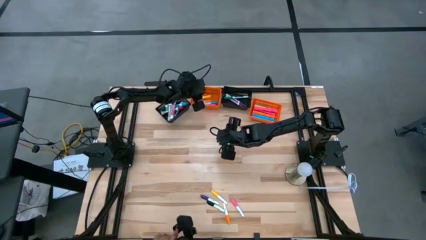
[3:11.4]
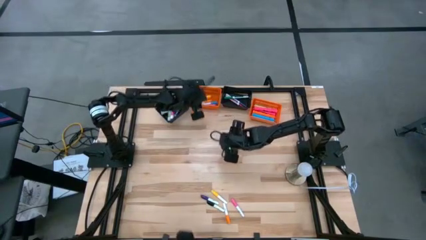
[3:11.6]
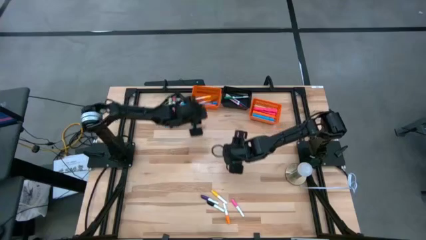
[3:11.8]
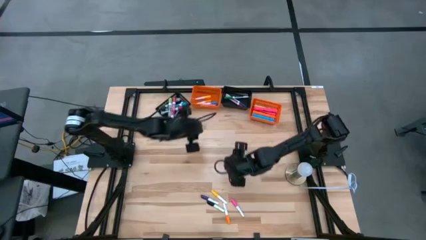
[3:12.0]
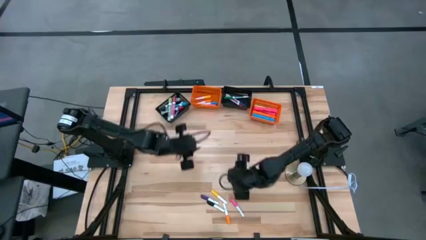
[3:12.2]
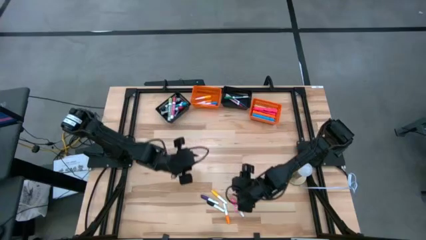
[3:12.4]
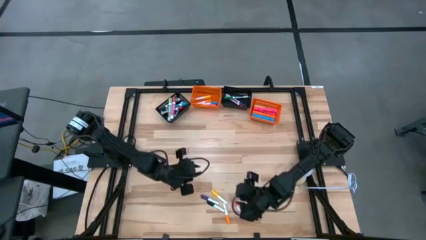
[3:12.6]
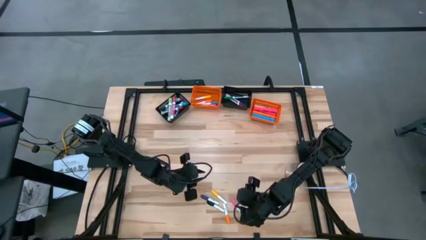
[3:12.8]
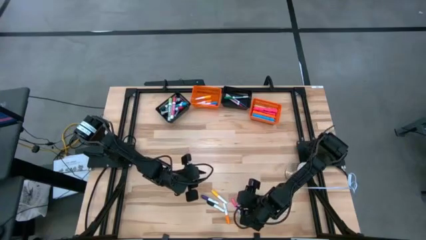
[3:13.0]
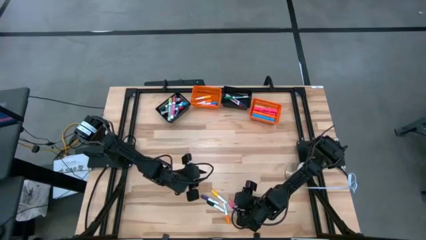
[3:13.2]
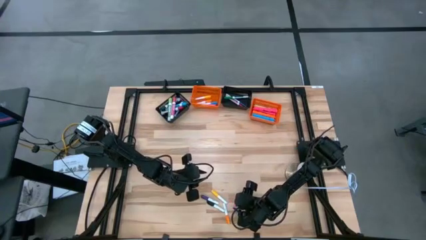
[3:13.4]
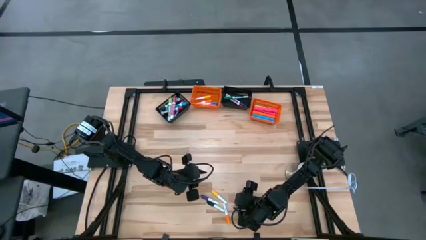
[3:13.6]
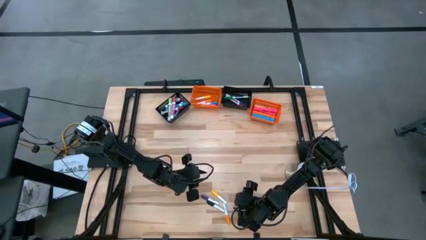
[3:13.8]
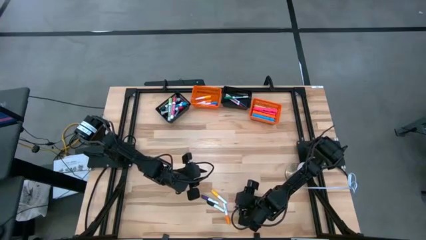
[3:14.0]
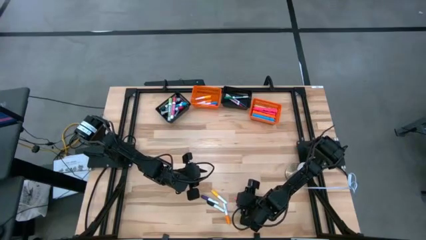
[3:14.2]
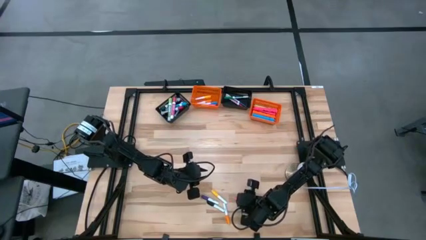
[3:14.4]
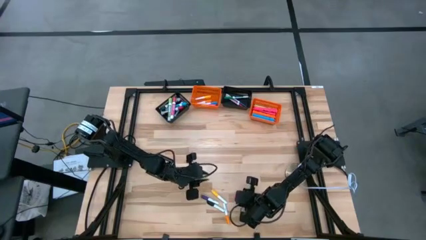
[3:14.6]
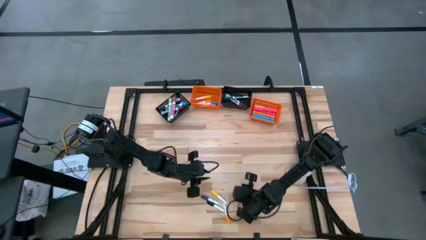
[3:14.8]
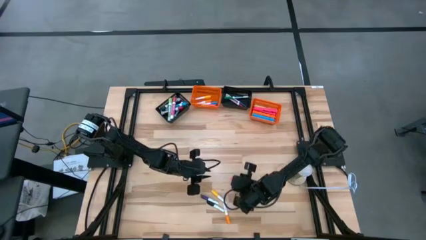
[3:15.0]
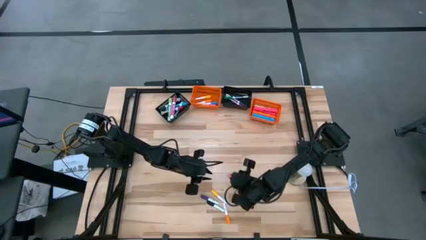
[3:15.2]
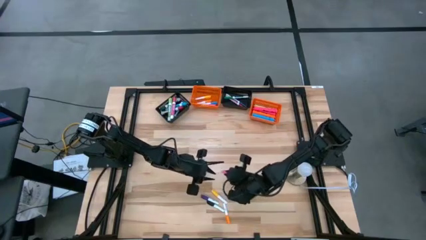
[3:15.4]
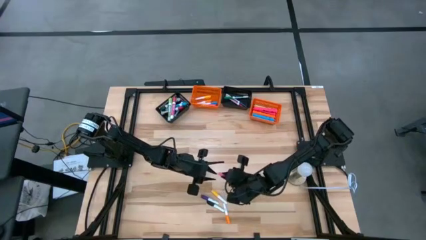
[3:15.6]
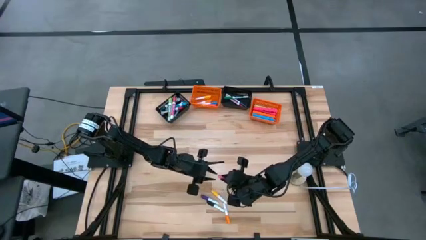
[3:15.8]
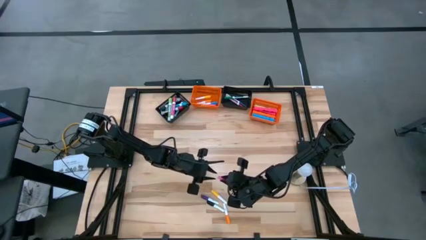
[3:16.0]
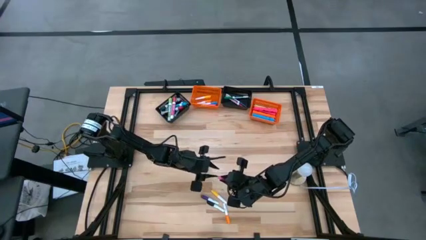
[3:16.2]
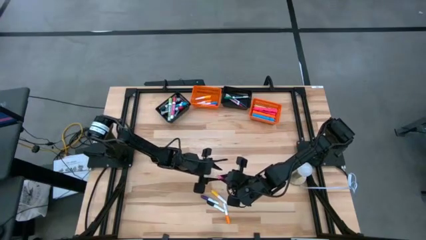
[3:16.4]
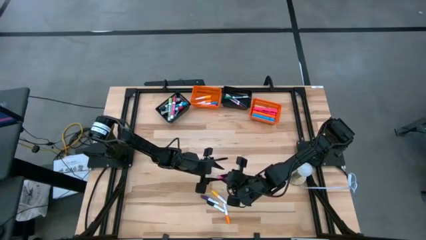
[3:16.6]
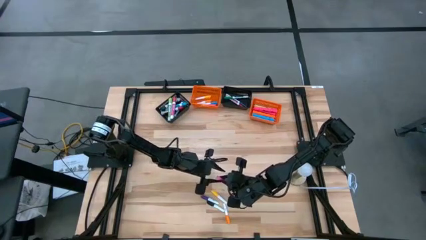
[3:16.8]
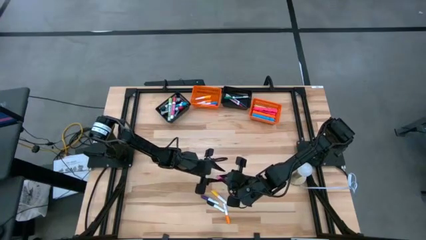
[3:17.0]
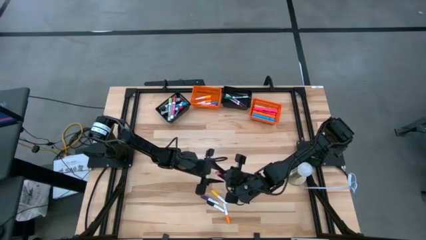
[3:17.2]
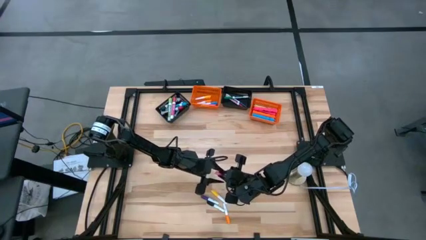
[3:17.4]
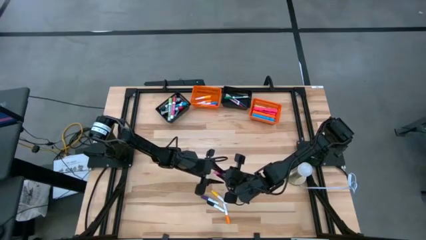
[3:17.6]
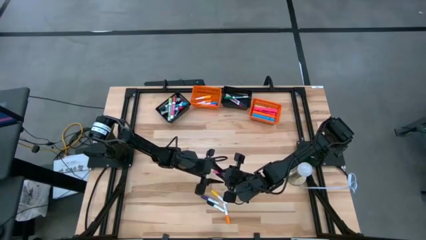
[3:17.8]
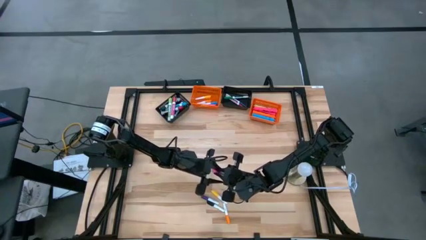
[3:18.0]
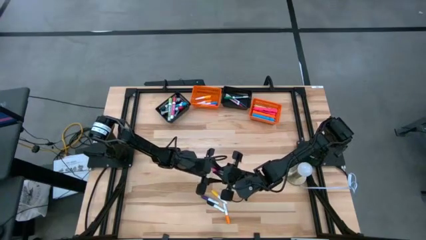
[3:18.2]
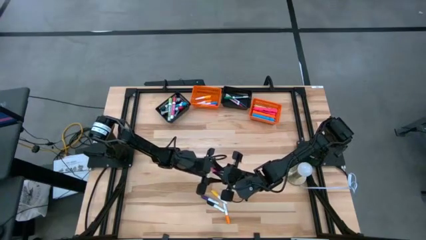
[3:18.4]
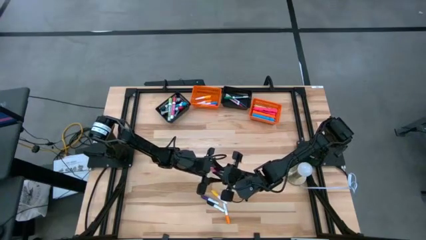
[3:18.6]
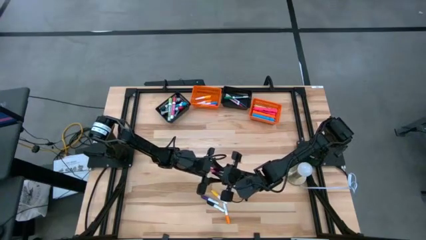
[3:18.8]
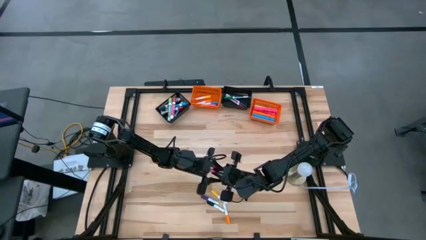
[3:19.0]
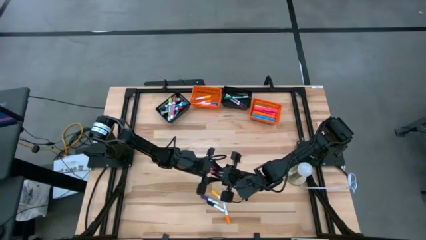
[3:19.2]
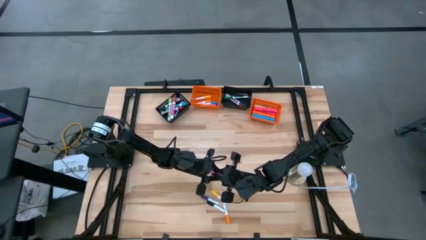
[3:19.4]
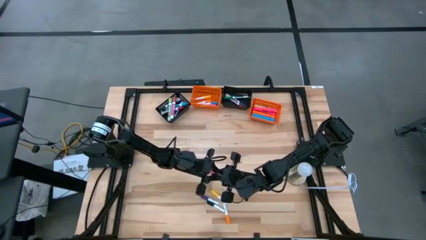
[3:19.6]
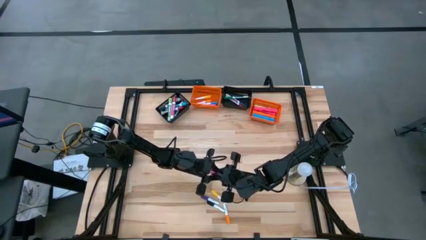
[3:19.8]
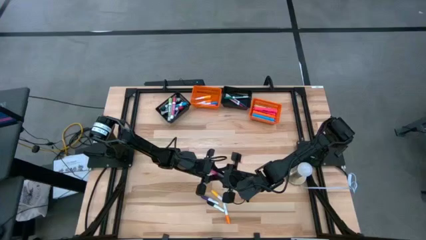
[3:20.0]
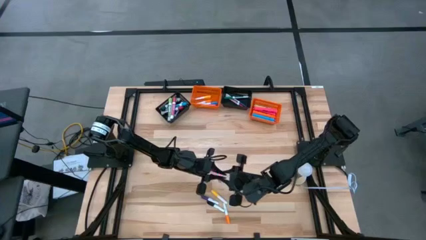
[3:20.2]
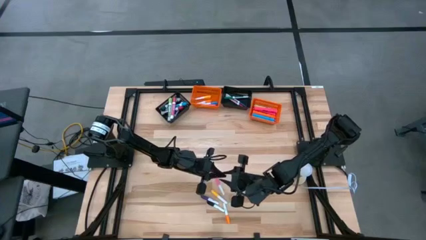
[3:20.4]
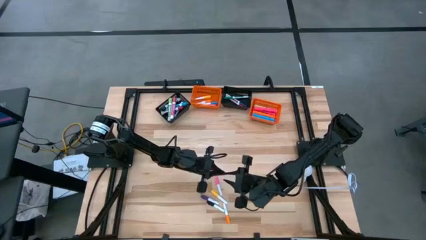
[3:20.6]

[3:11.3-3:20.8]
Task: Pick & Place Markers
Put the small pink highlighter into the left orange bin

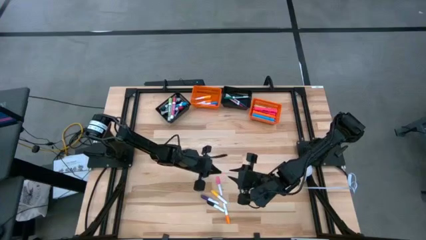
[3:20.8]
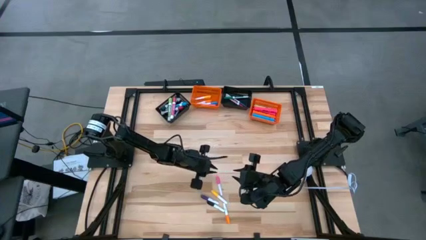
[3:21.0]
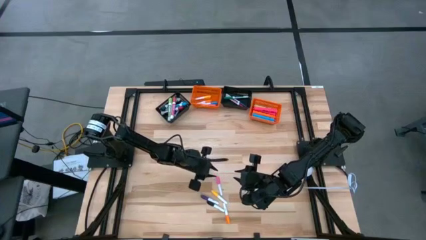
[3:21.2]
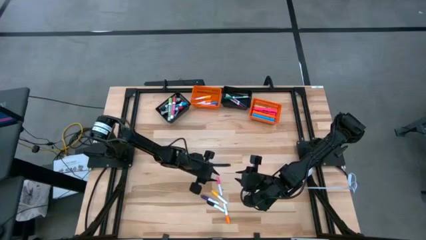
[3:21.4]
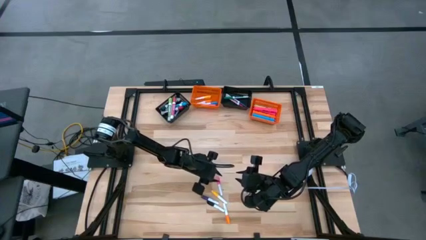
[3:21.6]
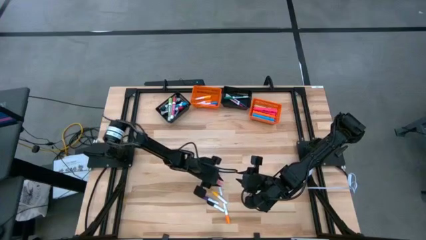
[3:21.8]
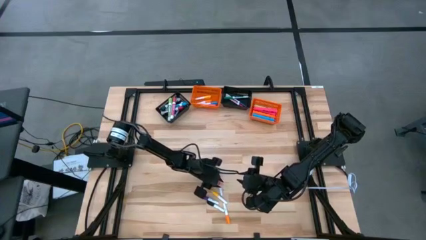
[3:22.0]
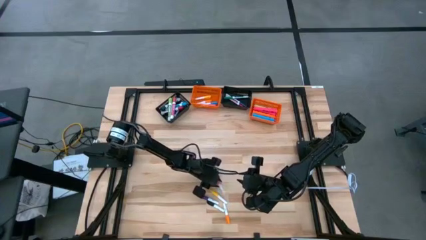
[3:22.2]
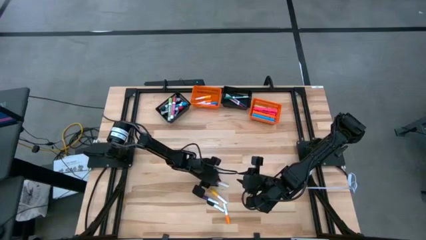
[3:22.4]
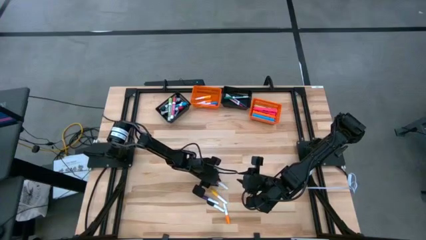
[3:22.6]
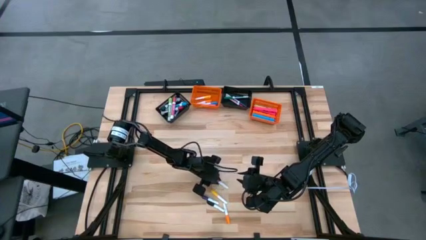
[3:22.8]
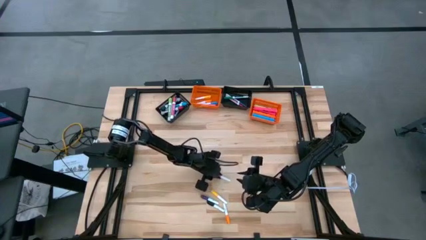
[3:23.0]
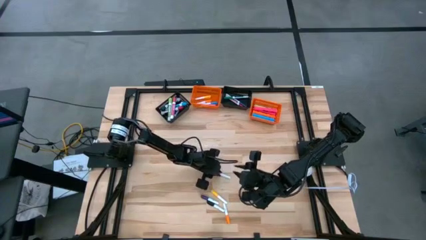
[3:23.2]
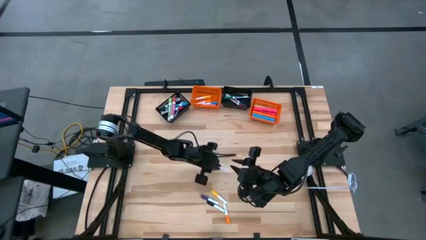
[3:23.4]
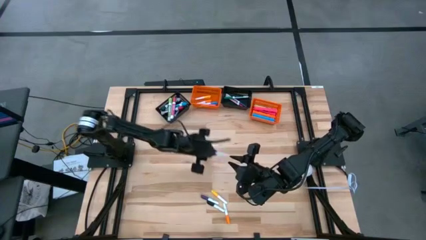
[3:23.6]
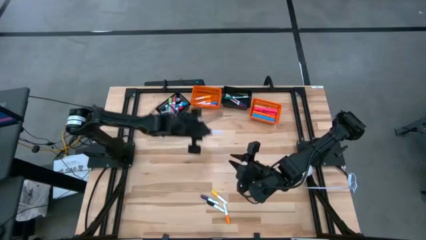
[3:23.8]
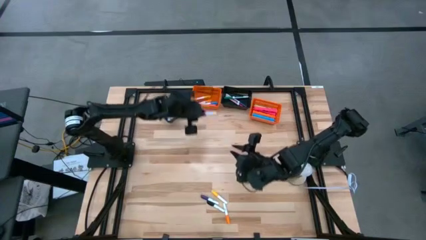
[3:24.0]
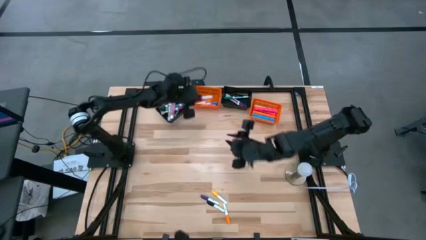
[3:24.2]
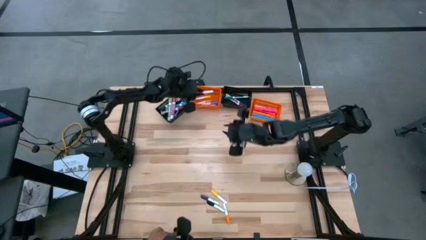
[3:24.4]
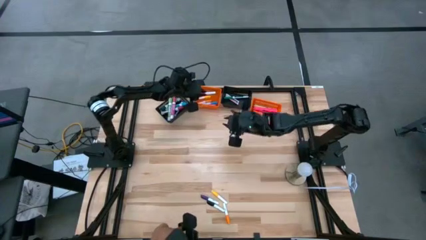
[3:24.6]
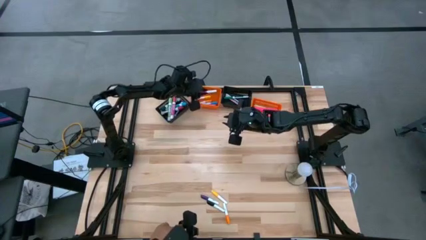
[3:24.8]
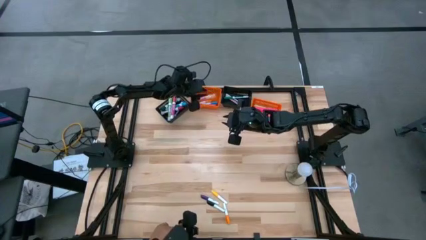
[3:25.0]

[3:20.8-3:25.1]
Put the small pink highlighter into the left orange bin

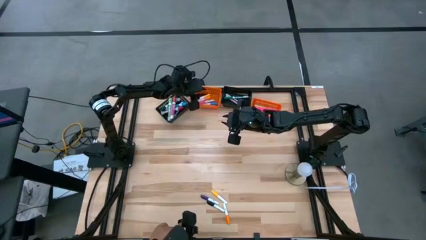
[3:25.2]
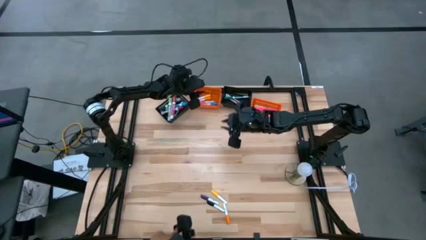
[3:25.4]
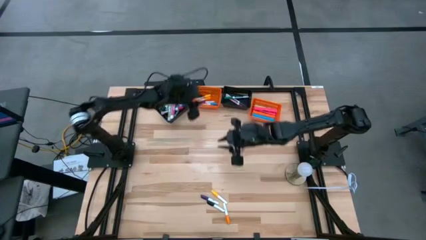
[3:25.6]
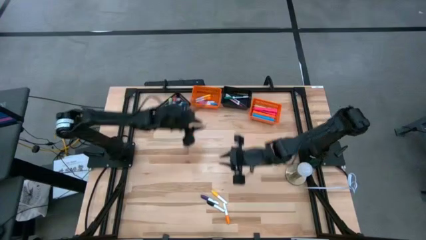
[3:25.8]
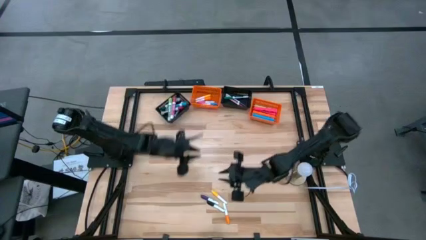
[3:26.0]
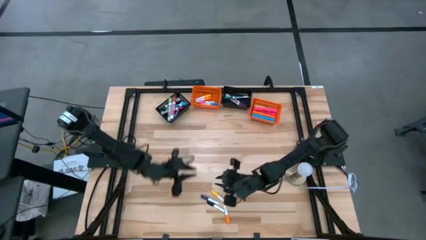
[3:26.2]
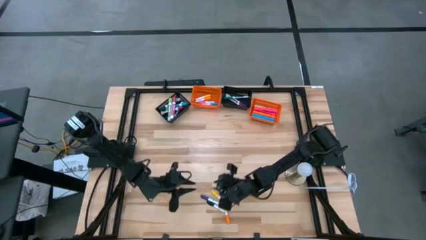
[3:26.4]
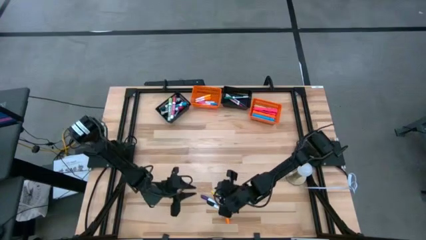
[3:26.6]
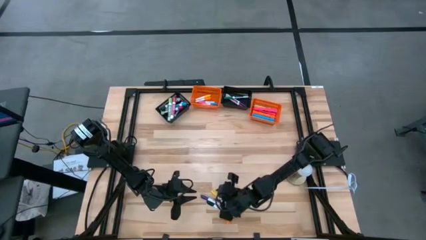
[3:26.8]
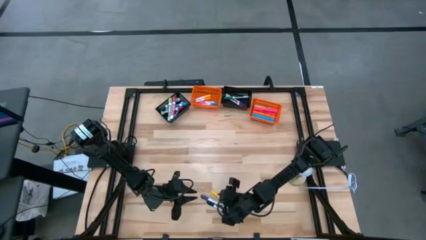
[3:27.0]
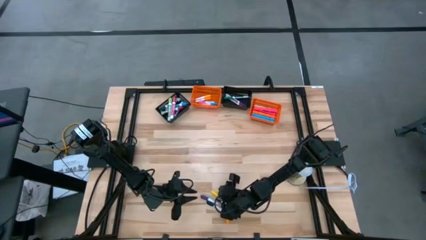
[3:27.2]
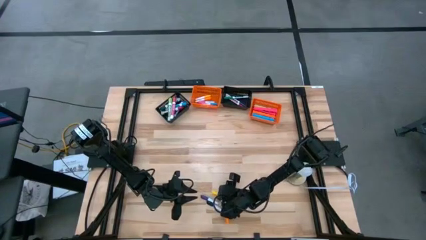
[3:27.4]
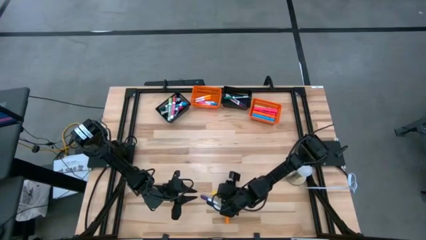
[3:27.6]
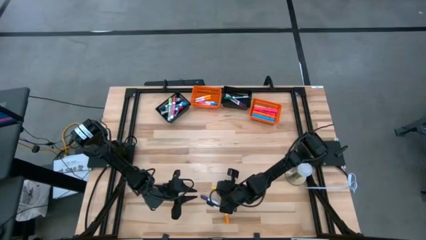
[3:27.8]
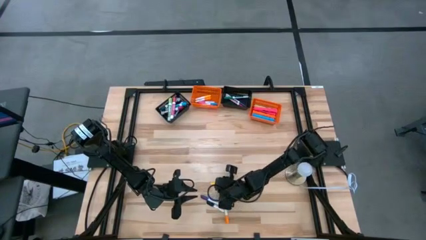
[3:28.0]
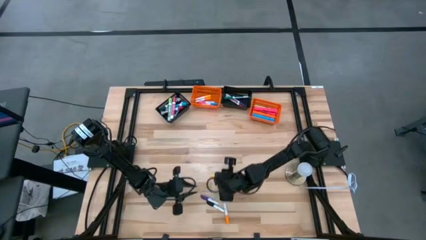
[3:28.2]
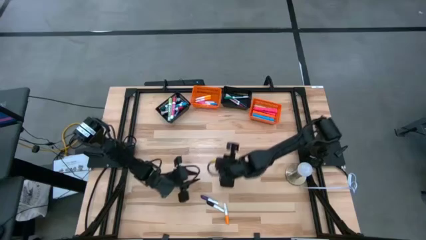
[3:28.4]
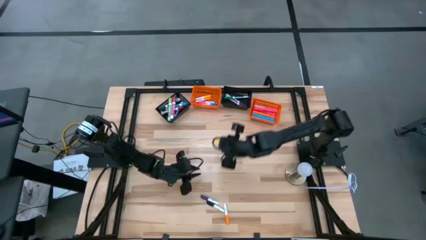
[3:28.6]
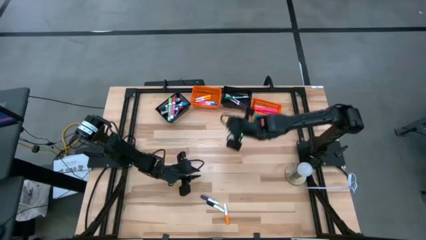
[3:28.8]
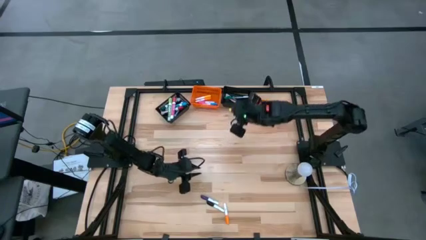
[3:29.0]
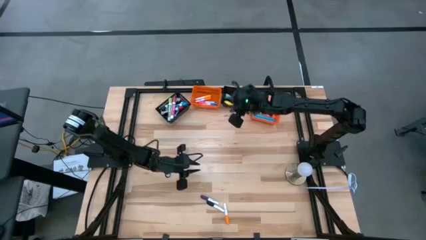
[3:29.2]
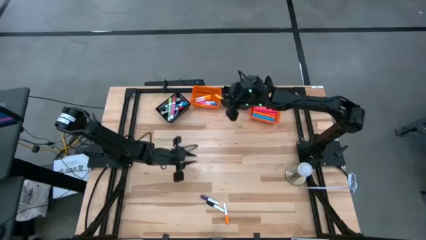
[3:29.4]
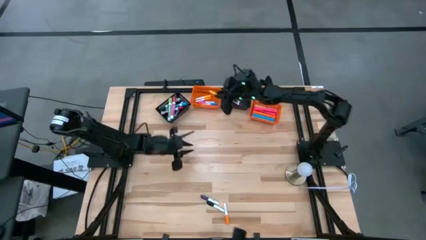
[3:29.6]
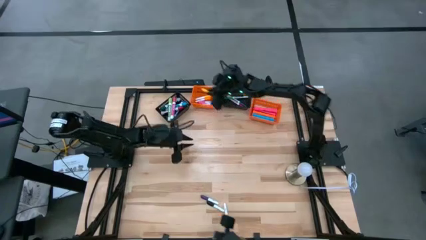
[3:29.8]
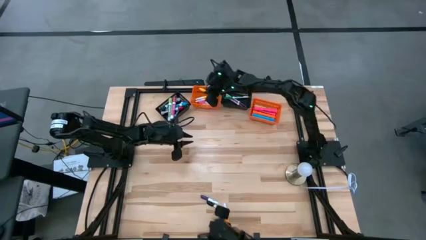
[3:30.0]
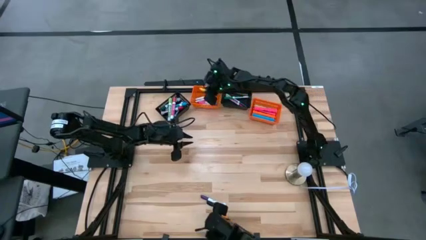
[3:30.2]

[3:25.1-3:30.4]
Put the small yellow highlighter into the left orange bin
